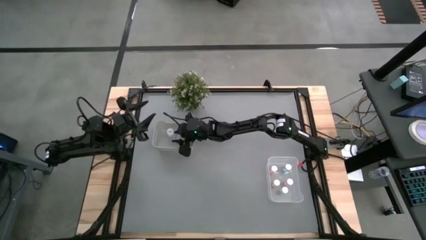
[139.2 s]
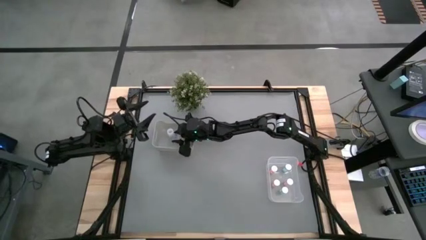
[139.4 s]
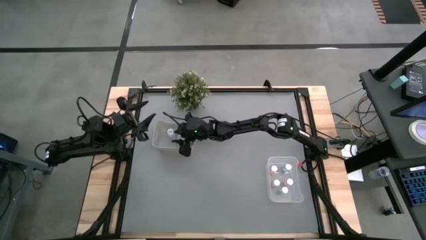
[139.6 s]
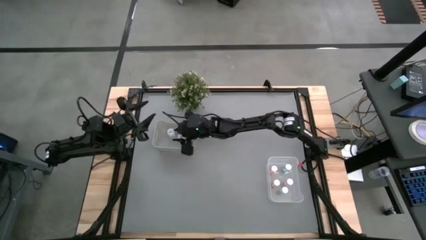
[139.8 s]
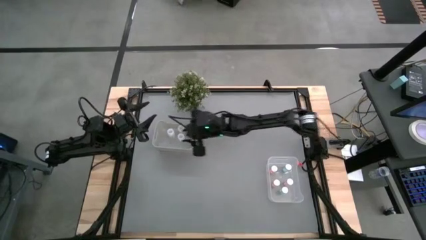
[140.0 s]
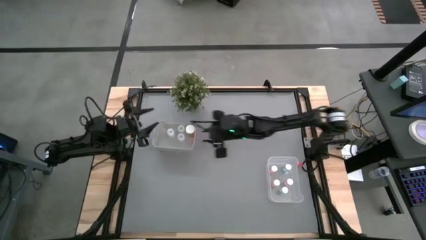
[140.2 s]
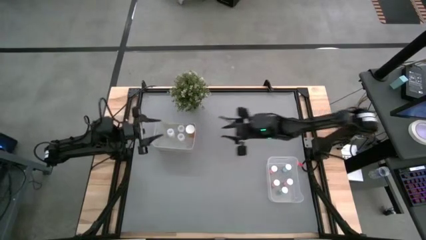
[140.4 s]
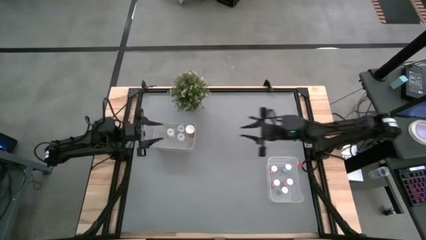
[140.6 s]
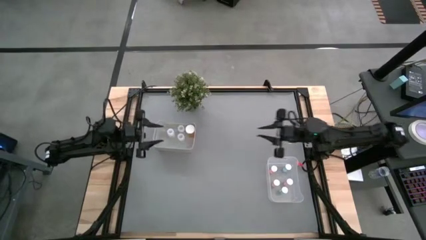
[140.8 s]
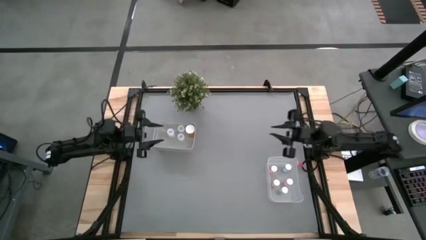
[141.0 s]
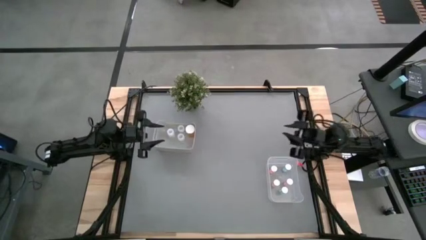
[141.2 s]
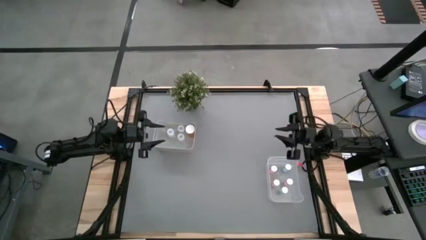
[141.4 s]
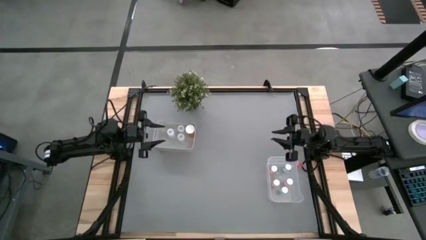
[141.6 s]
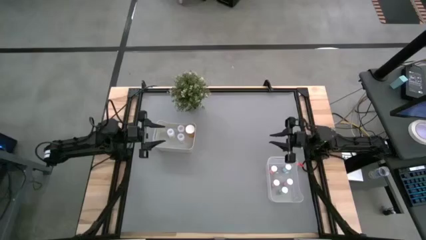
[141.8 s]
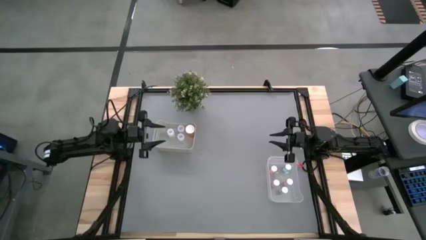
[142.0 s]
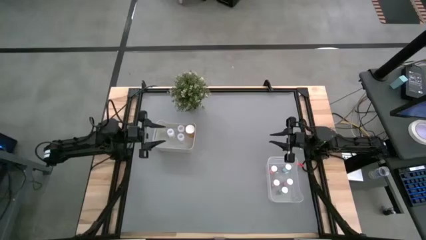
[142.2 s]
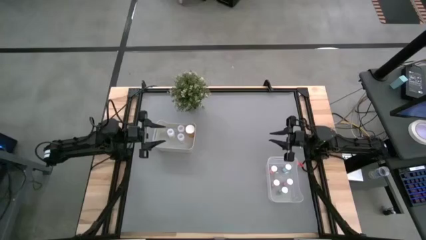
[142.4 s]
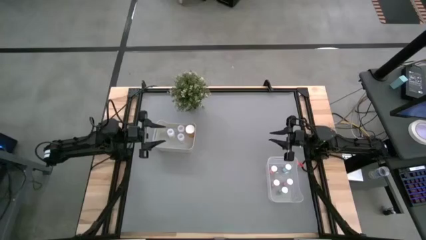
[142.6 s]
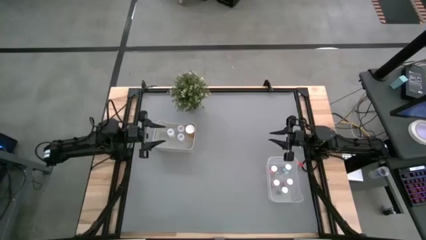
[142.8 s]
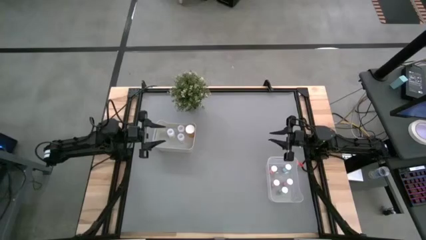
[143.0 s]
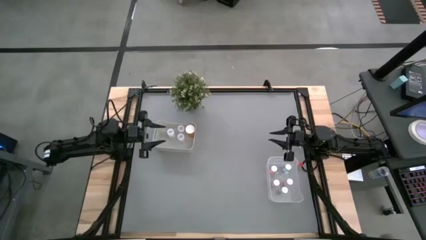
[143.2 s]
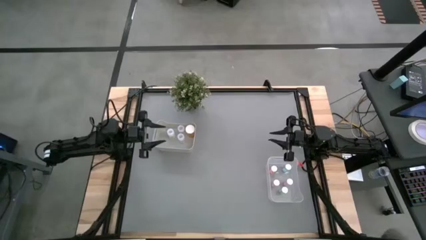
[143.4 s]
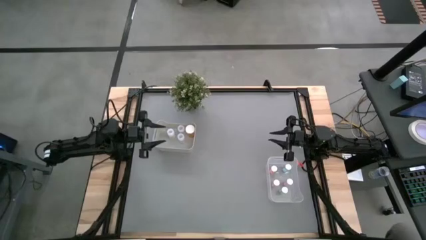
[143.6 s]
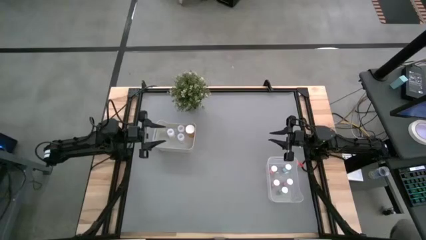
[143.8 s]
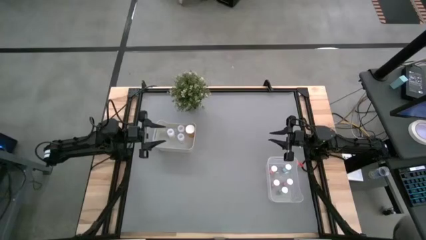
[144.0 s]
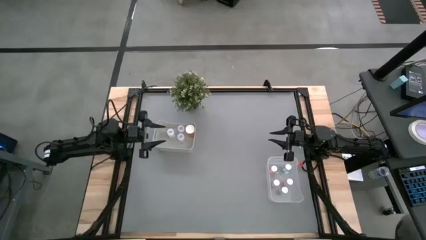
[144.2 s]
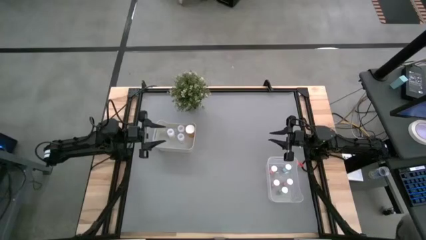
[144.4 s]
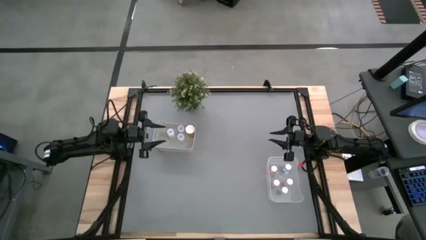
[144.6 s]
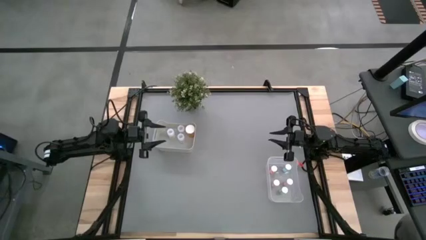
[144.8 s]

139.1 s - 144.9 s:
Task: Pick and place medicine bottles into bin by pill shape (circle, oval)
Return to Home Position

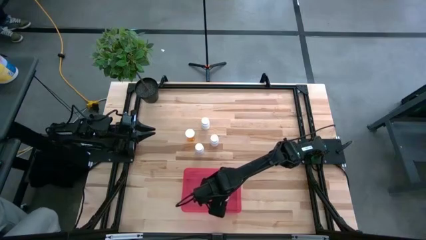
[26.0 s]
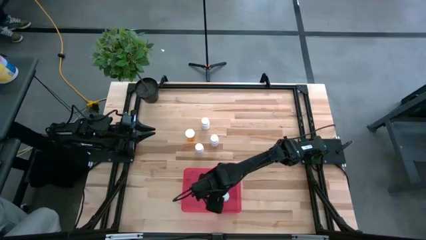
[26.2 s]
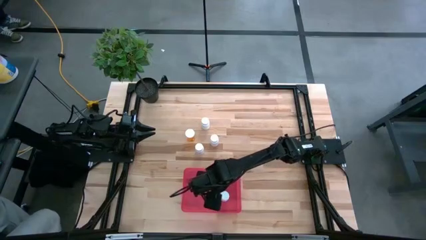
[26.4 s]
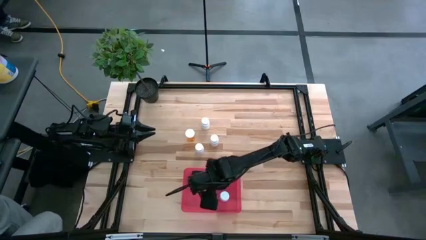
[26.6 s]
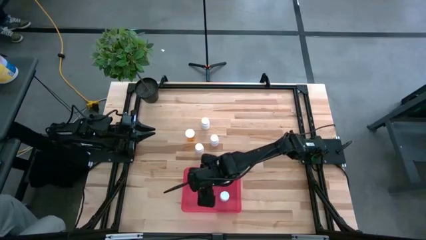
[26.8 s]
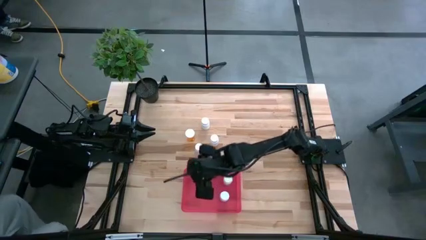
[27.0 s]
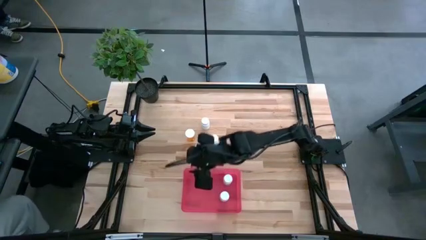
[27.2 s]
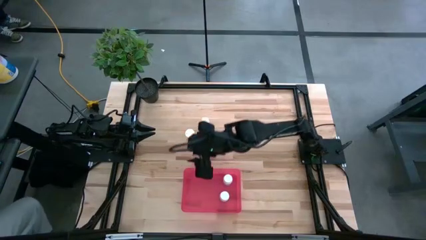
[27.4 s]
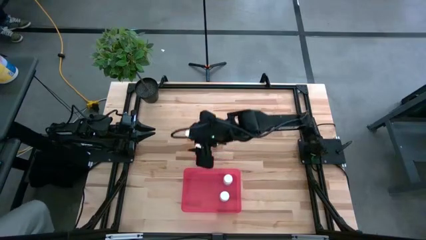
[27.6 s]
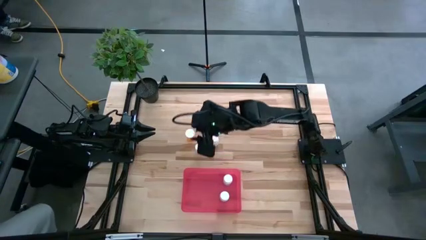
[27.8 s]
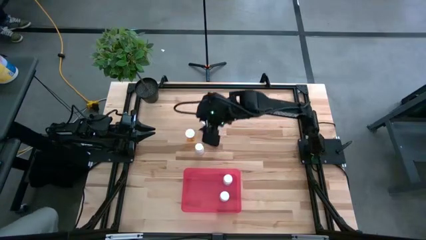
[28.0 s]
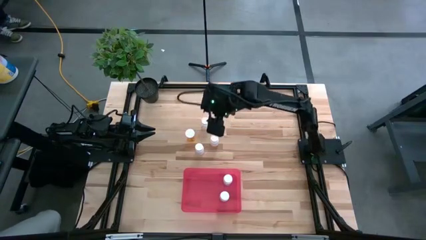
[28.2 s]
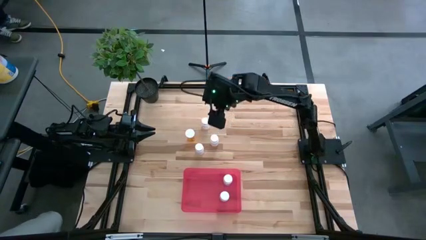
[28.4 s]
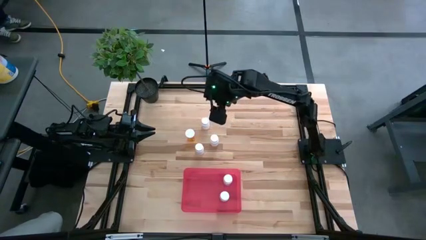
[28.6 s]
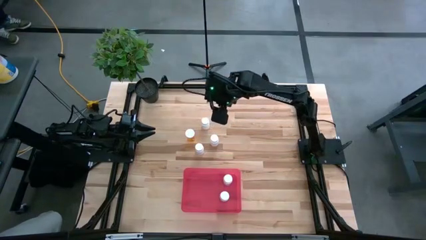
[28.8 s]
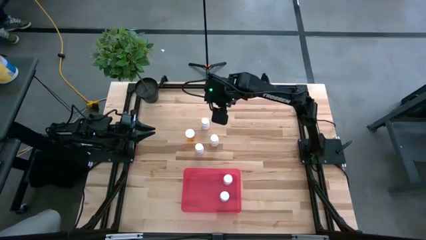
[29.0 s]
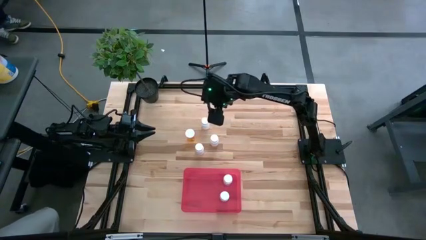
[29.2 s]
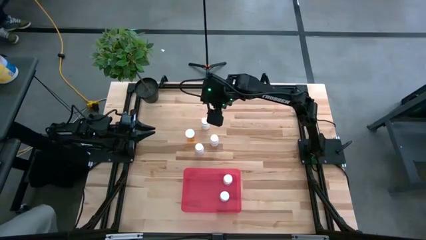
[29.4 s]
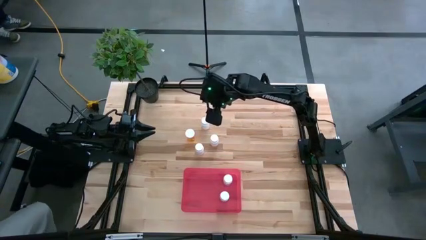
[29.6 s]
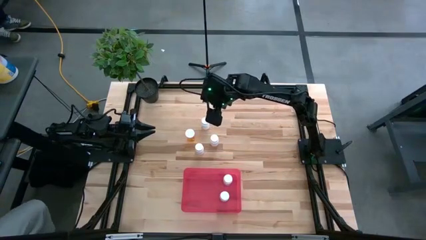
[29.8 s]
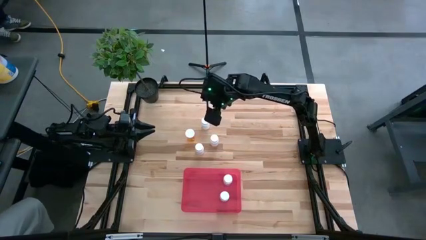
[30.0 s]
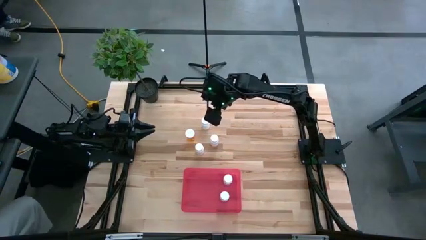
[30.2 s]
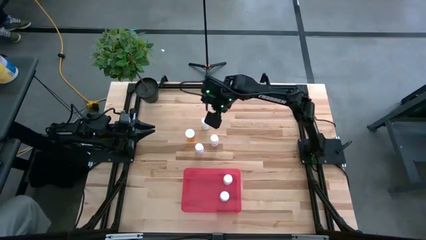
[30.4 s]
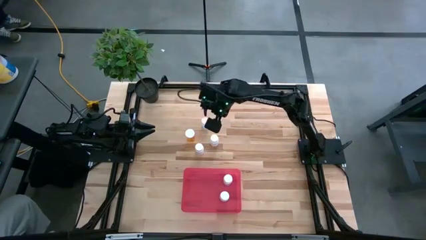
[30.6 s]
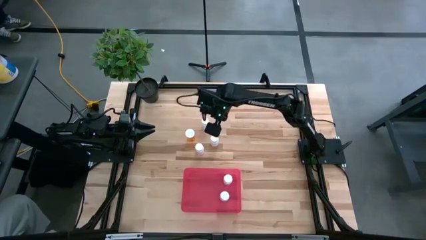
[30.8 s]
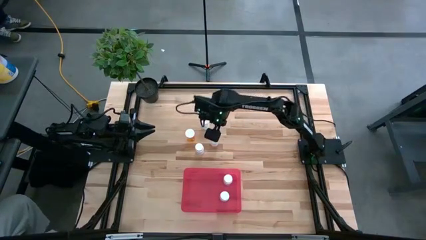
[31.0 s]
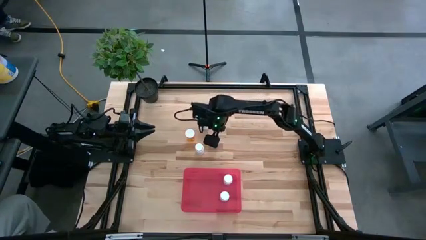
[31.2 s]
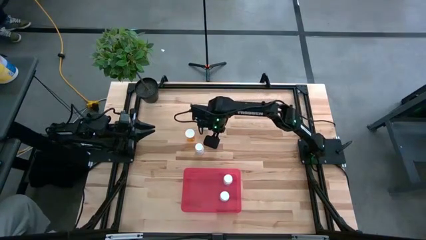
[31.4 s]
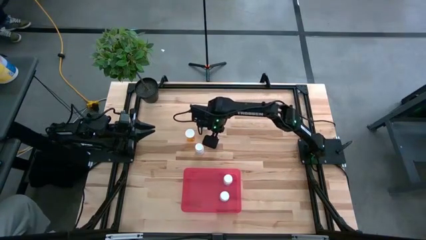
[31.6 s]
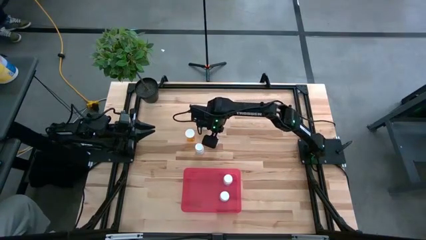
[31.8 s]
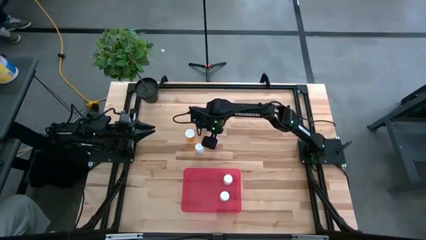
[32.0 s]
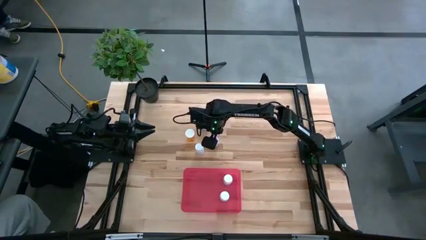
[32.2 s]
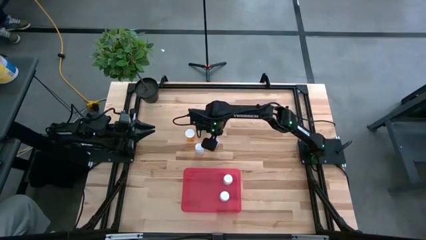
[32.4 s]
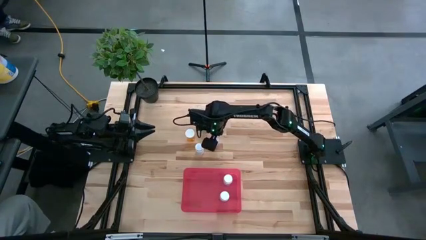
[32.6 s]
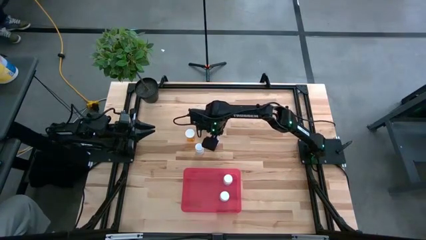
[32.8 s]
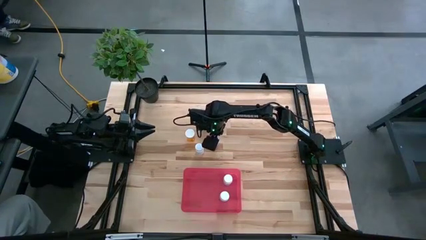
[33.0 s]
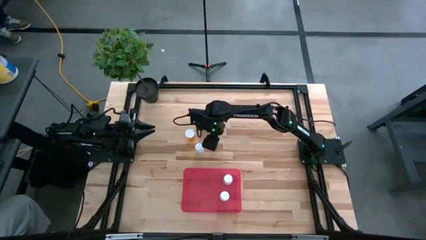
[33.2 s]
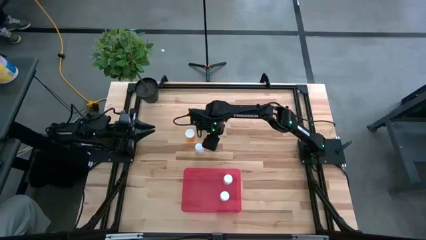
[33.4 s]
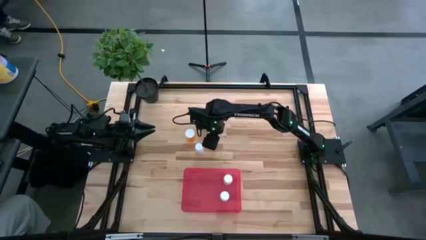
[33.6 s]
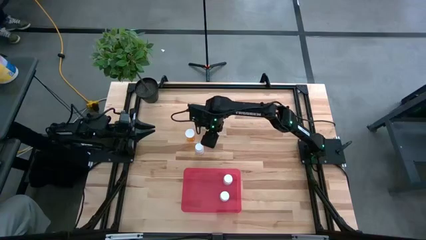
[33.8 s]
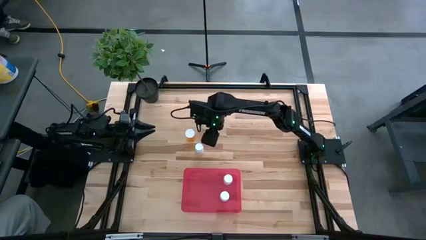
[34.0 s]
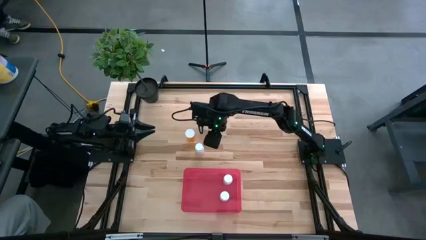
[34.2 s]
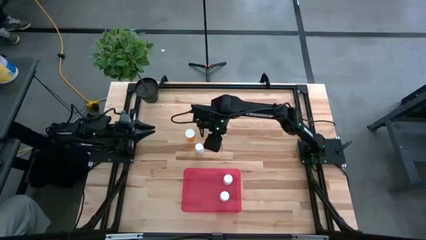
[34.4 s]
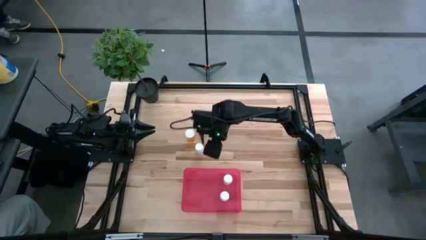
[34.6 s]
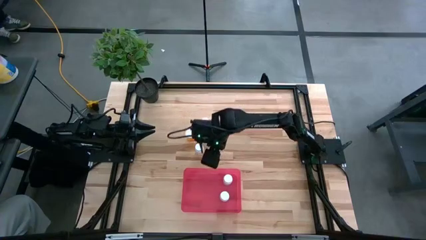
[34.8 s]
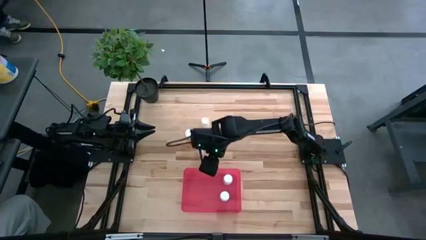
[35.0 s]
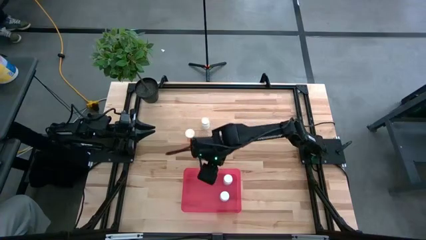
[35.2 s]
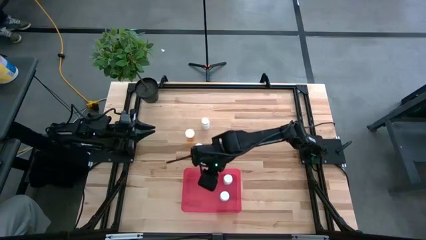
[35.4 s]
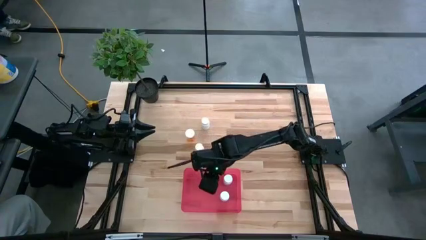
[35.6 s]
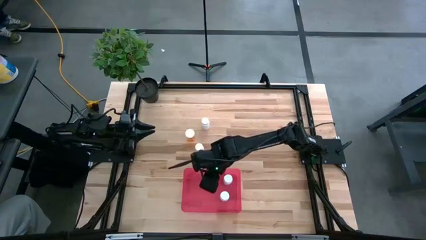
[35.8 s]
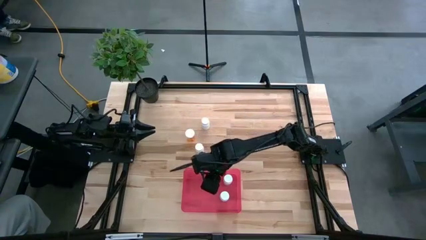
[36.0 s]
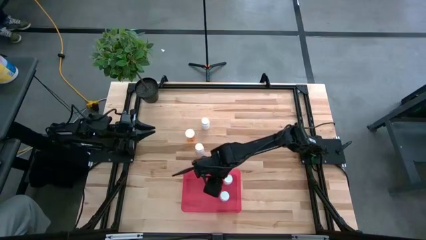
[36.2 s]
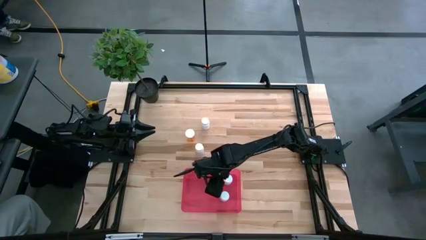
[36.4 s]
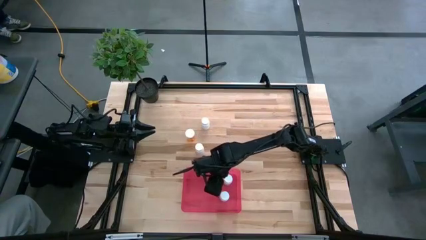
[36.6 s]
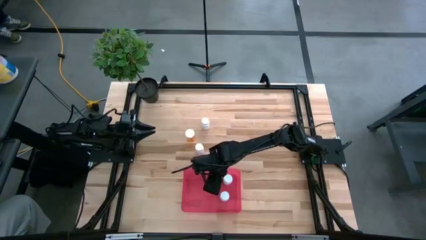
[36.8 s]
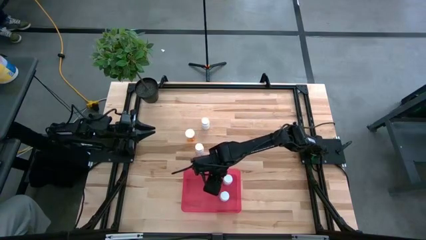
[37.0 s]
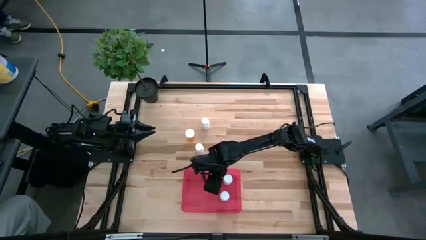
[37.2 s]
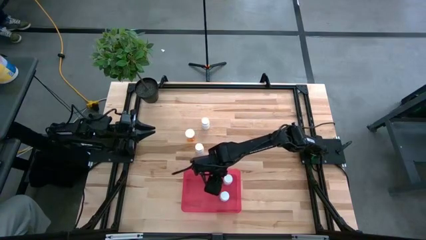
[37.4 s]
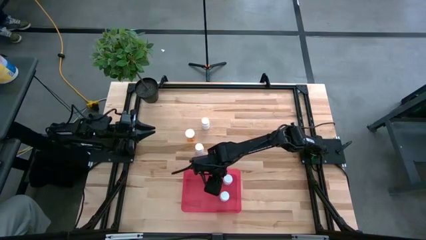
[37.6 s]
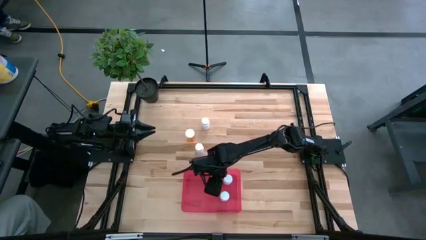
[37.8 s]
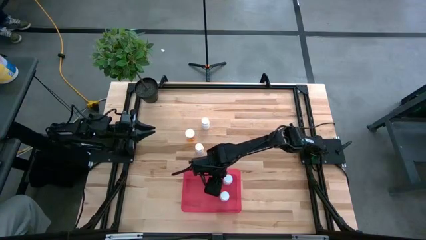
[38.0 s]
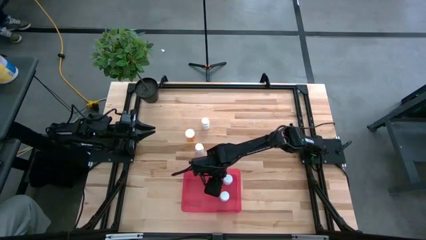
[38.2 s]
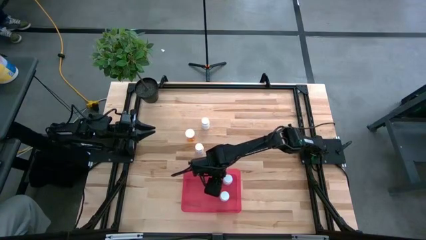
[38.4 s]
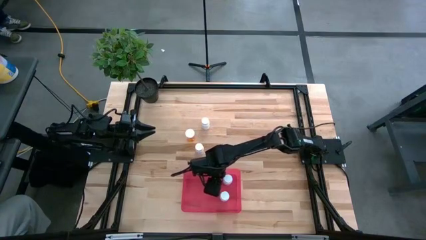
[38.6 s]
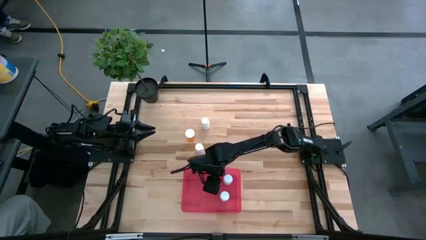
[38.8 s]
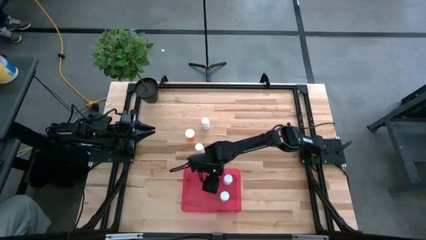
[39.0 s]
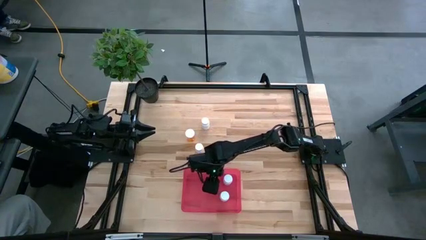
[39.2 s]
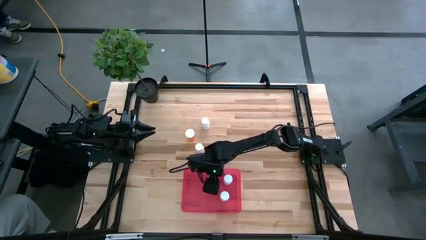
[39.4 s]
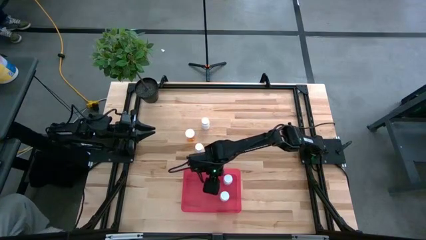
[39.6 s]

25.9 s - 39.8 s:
Task: Pick and place pill bottles into a basket
Put the white pill bottle into the bin
